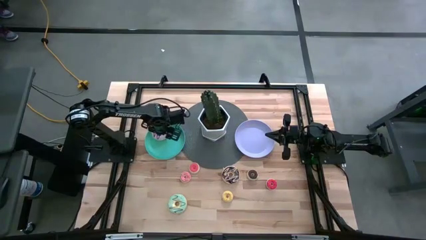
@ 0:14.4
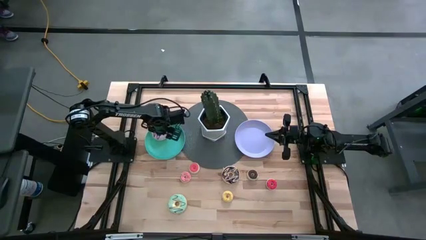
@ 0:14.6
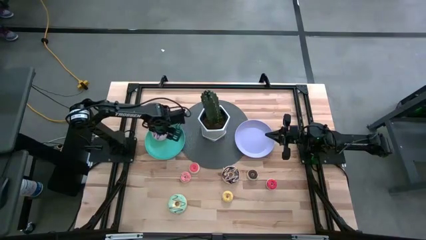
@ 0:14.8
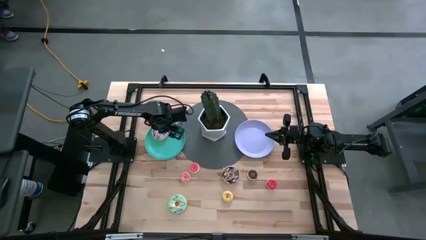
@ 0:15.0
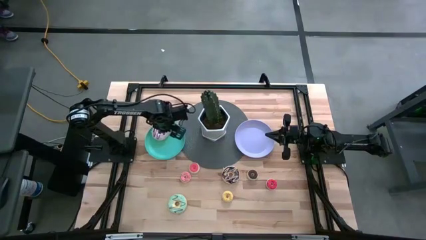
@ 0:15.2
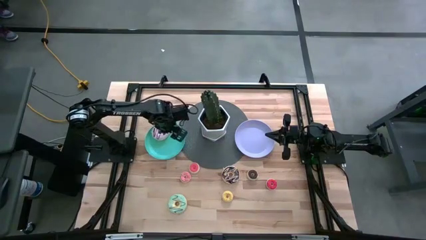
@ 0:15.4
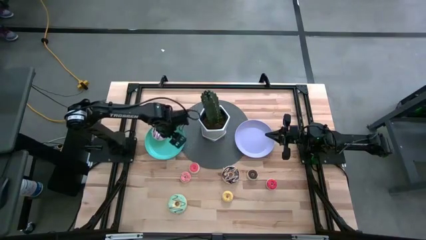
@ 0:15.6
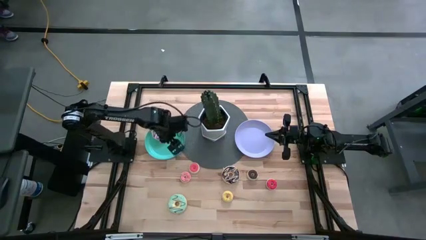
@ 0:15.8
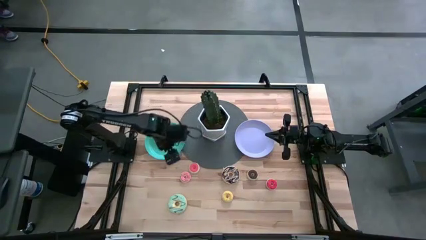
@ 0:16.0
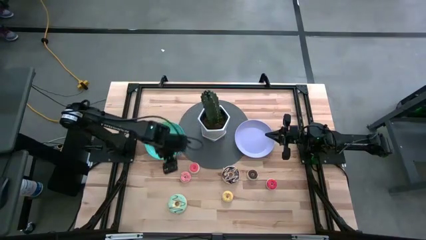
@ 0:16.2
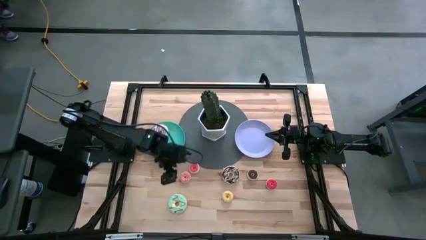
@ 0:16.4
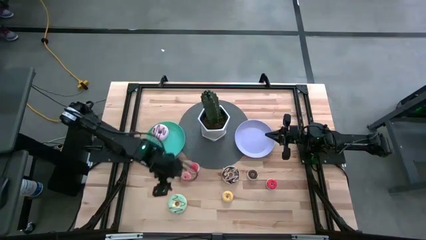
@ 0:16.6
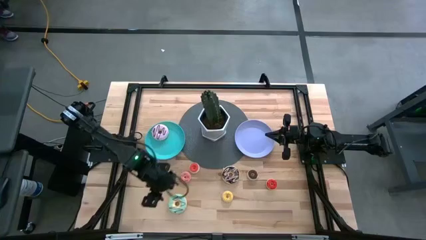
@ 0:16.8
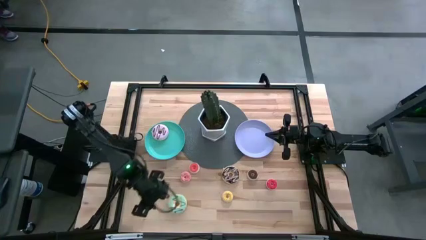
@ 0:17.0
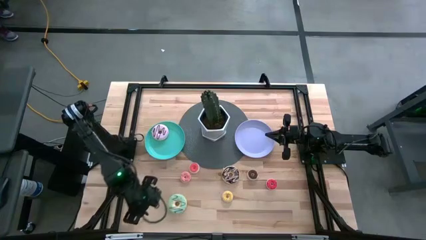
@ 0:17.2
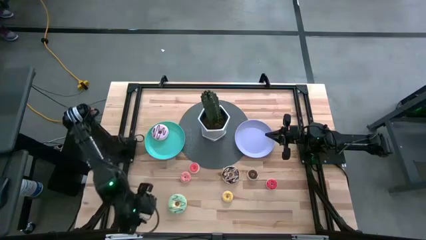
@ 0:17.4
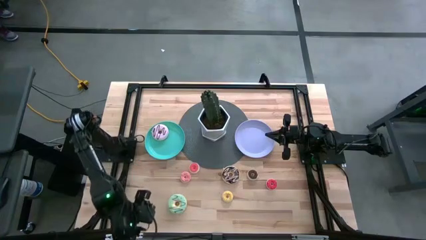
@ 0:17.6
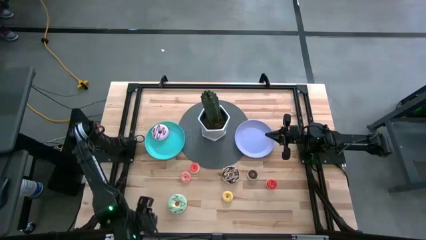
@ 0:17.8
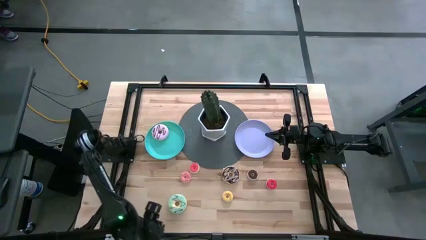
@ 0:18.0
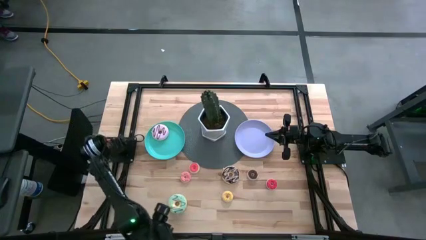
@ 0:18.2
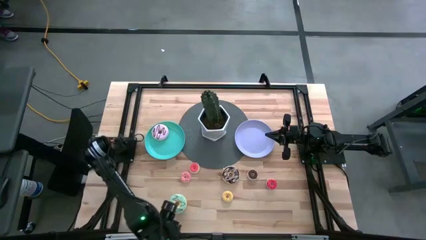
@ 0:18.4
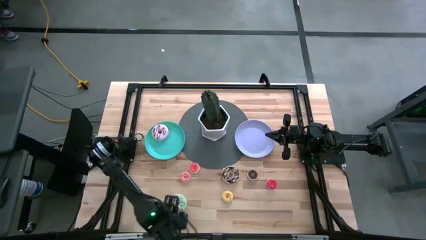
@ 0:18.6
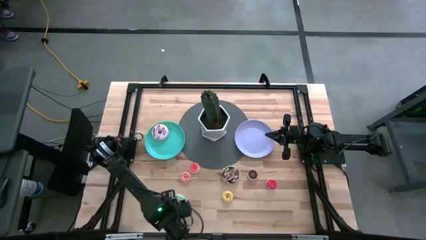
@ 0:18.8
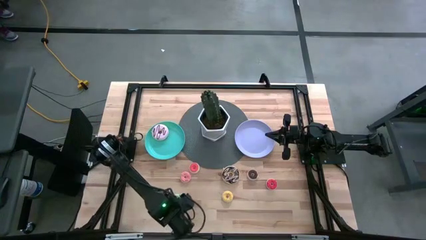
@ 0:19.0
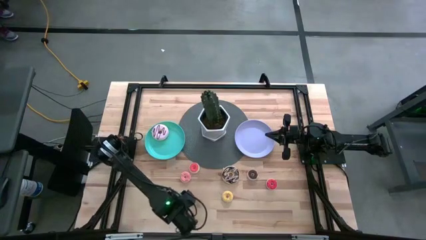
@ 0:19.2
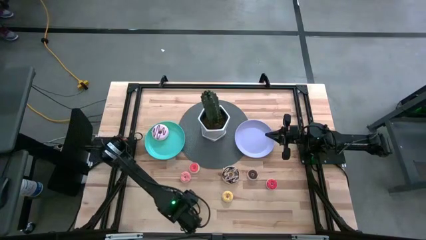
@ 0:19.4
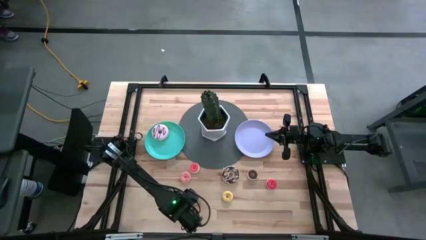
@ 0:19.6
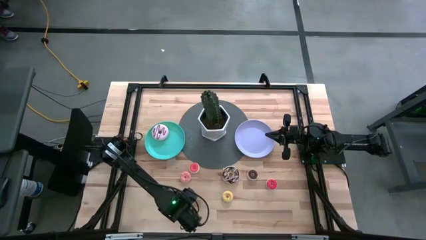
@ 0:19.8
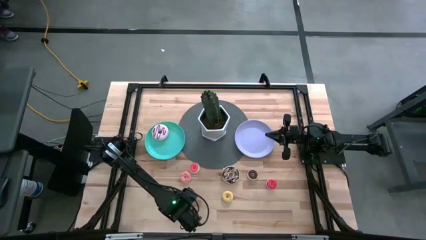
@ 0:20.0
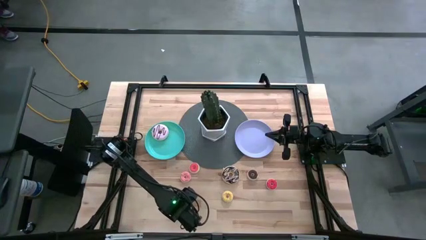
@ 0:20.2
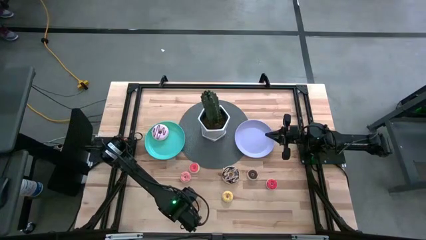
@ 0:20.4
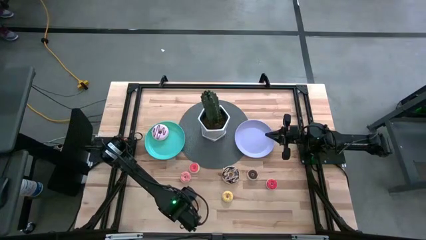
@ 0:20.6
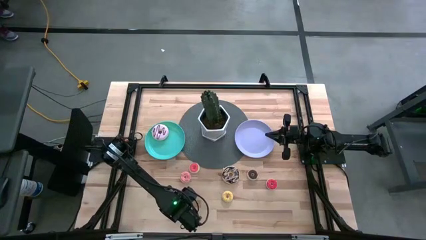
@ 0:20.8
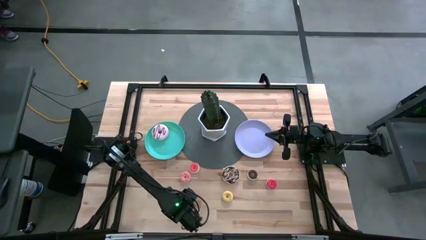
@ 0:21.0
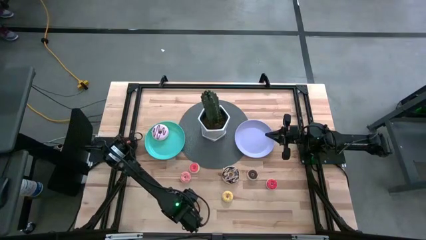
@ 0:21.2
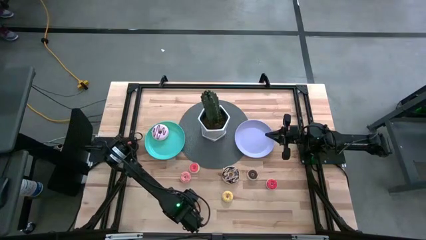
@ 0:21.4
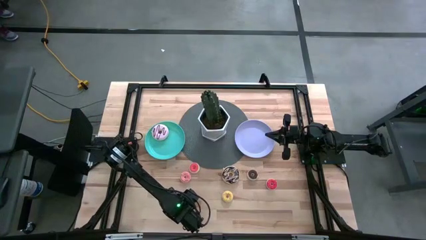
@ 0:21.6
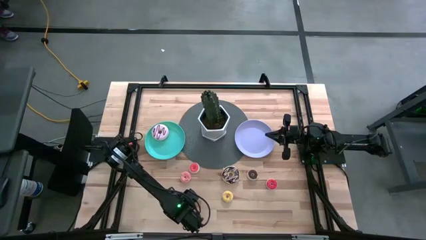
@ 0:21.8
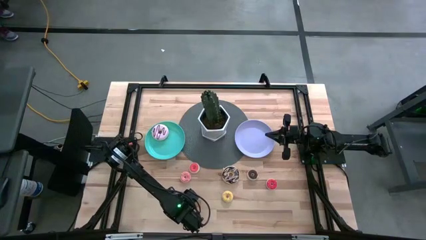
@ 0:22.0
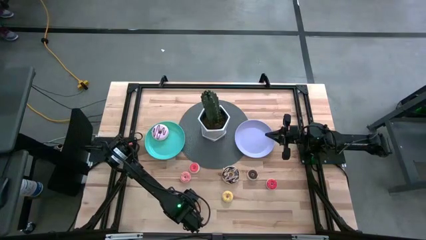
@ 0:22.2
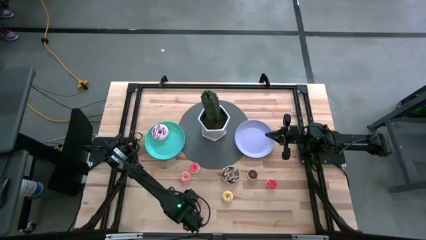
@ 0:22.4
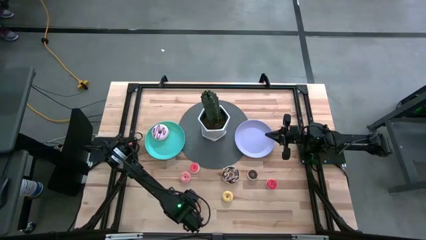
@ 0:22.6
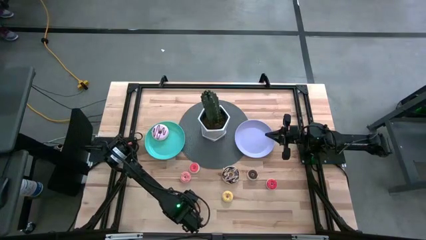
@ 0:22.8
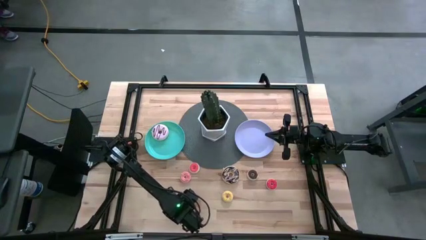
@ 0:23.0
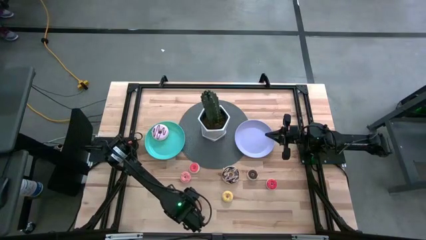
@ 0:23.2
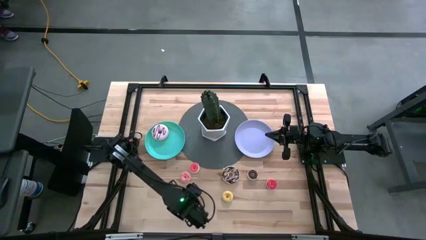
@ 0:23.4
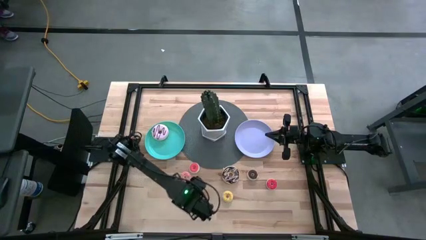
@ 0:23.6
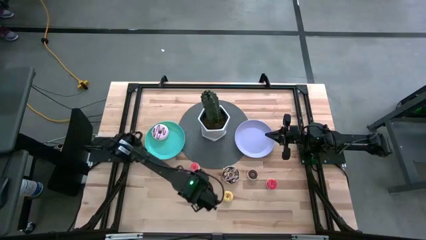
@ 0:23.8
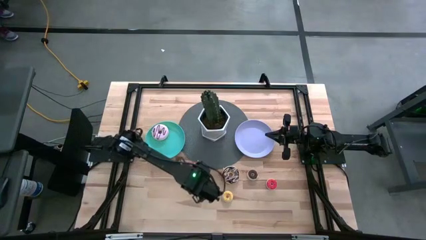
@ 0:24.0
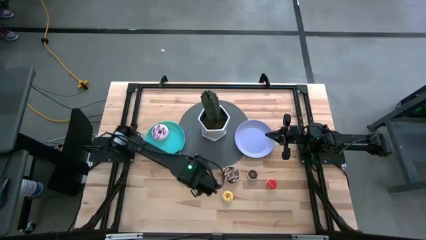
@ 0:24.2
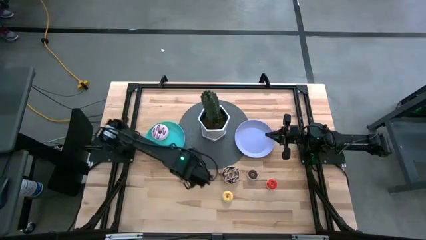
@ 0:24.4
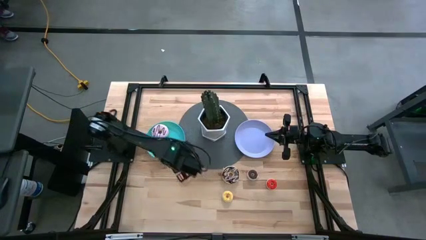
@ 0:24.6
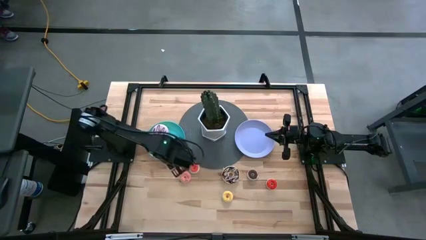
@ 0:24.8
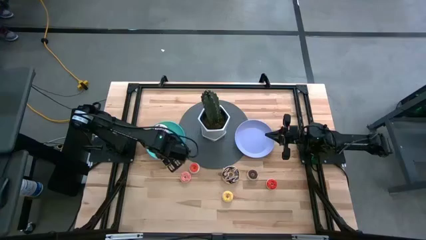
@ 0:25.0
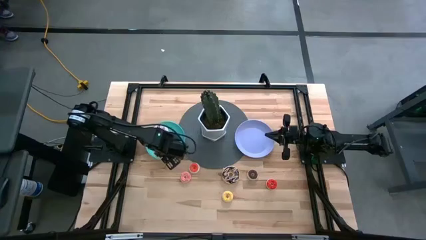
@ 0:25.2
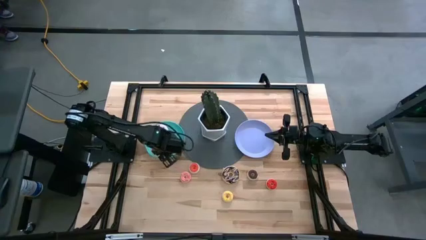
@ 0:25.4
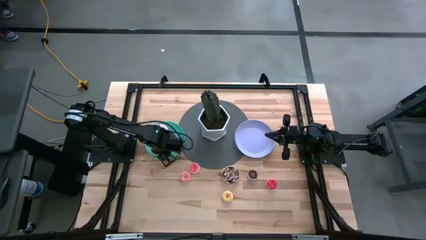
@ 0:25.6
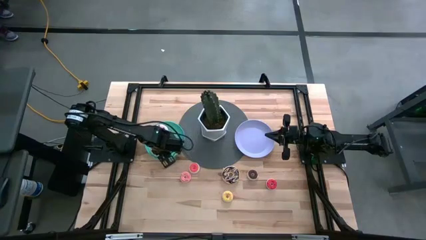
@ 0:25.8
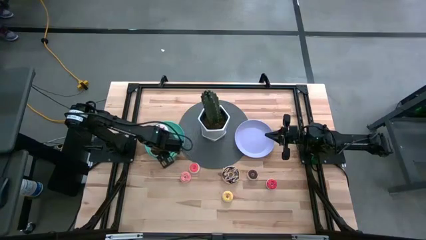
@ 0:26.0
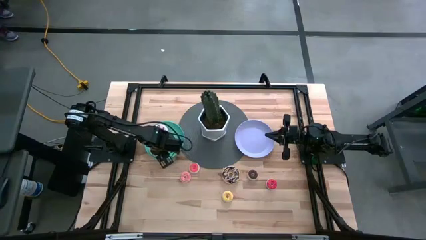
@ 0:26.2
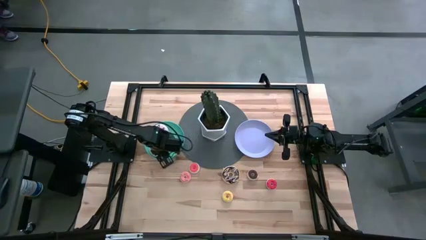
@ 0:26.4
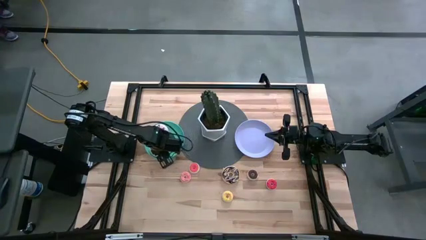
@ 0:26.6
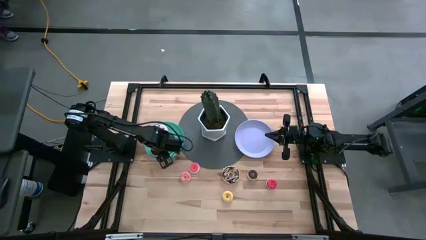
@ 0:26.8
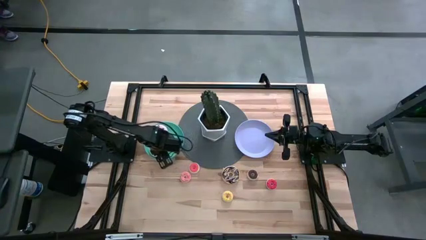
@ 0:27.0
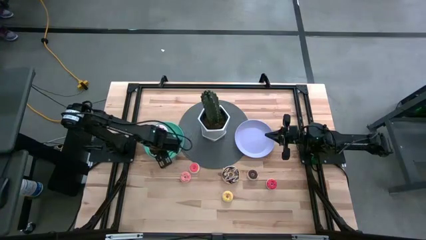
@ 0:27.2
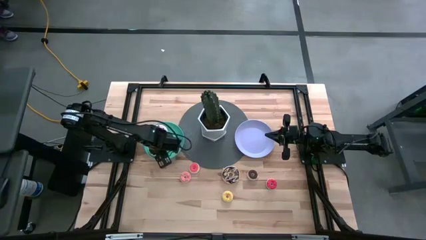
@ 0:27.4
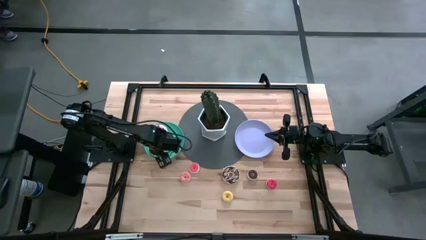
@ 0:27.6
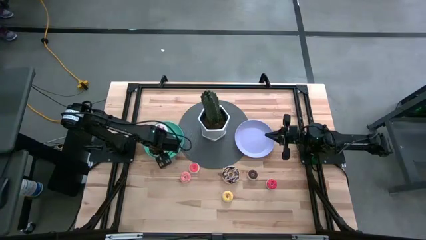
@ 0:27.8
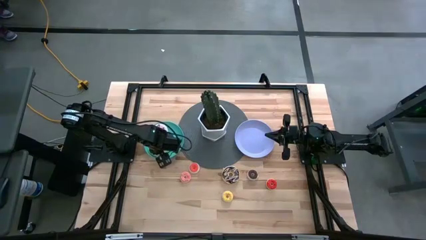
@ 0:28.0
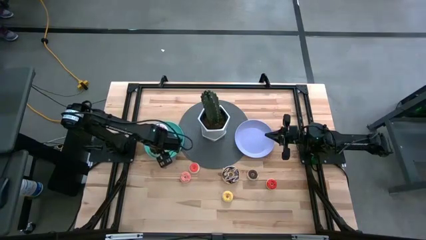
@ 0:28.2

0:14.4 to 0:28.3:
Task: Pick & Place donuts
Put the big green donut on the green plate
